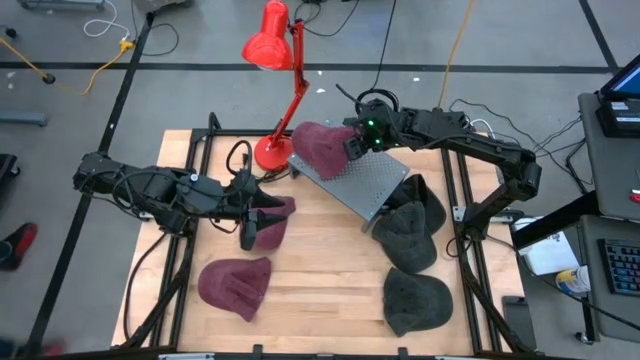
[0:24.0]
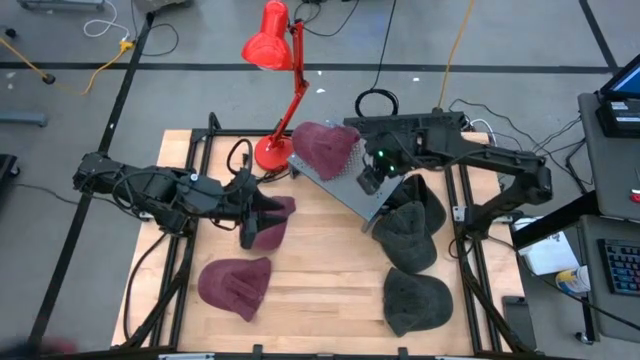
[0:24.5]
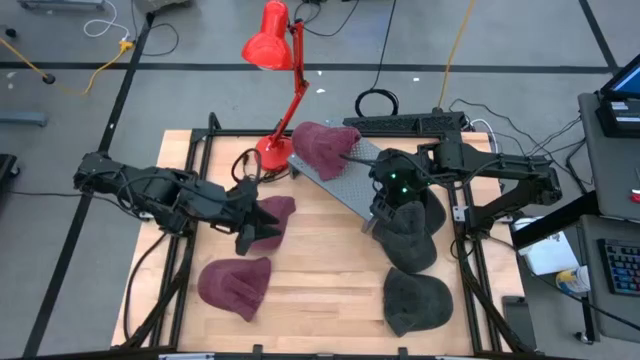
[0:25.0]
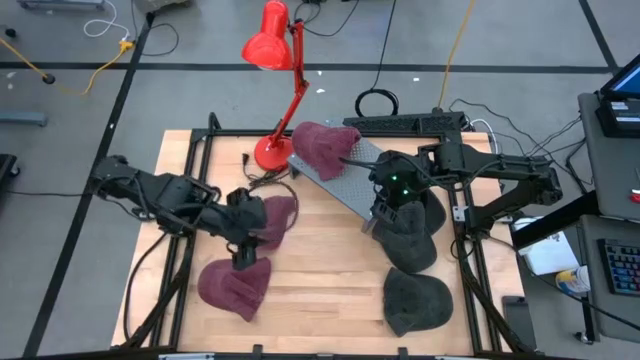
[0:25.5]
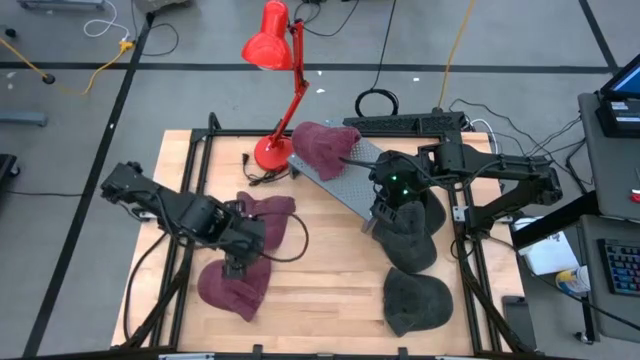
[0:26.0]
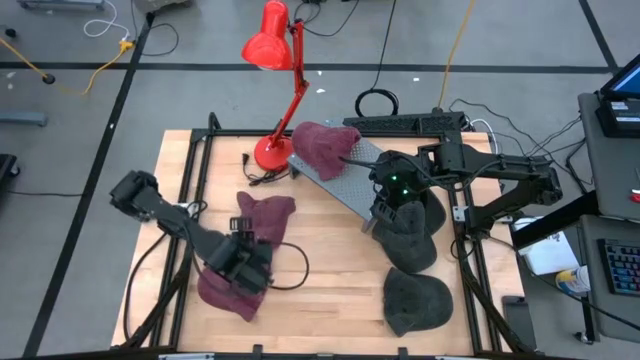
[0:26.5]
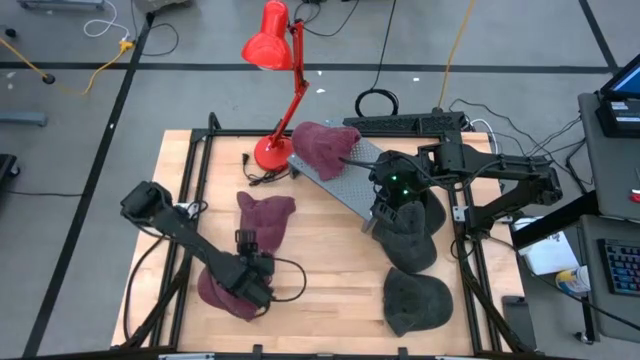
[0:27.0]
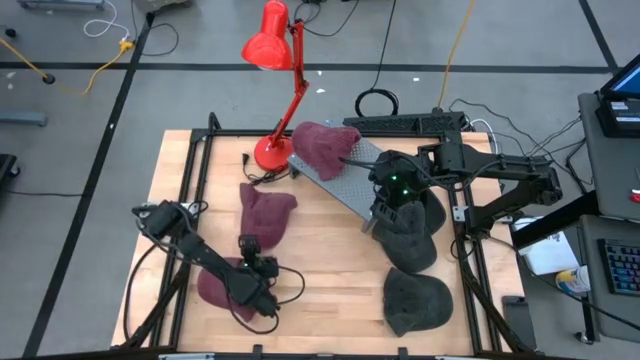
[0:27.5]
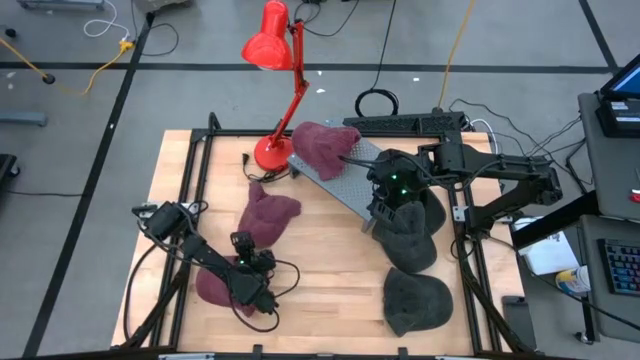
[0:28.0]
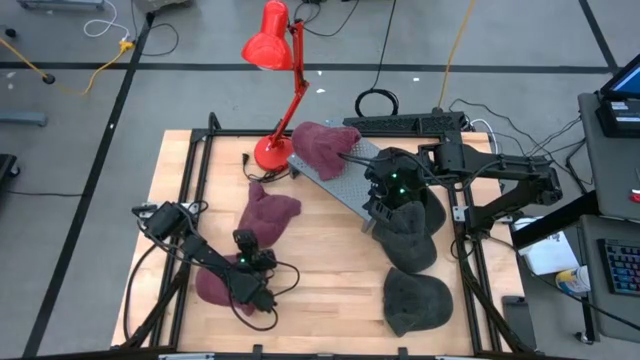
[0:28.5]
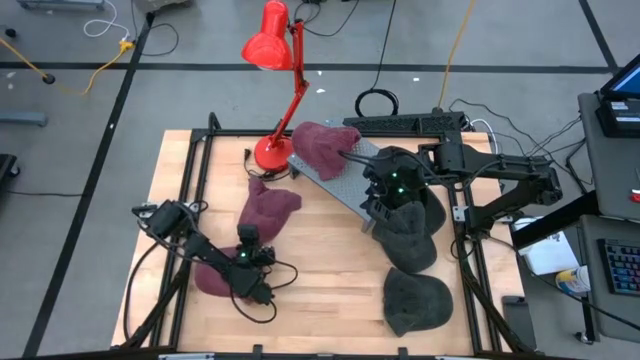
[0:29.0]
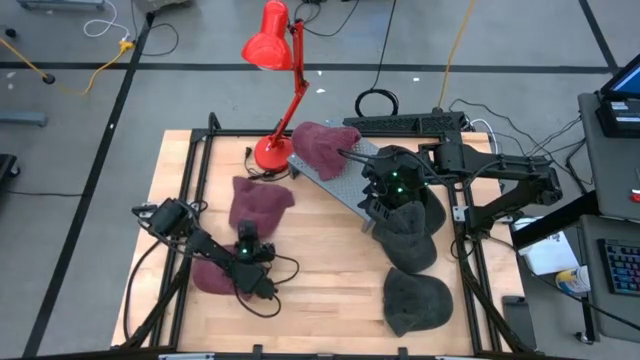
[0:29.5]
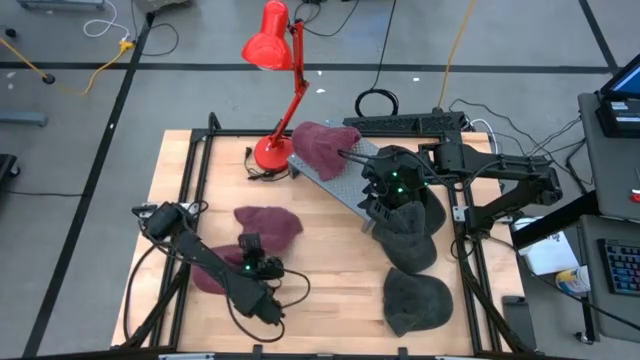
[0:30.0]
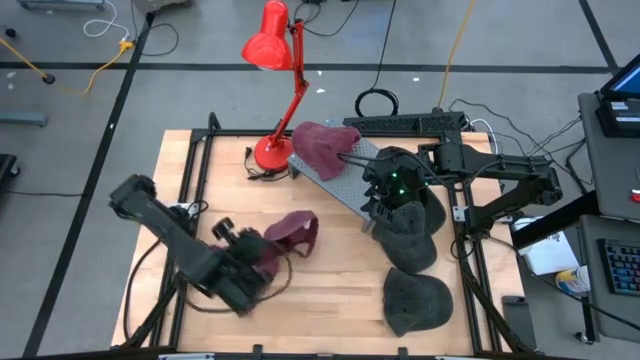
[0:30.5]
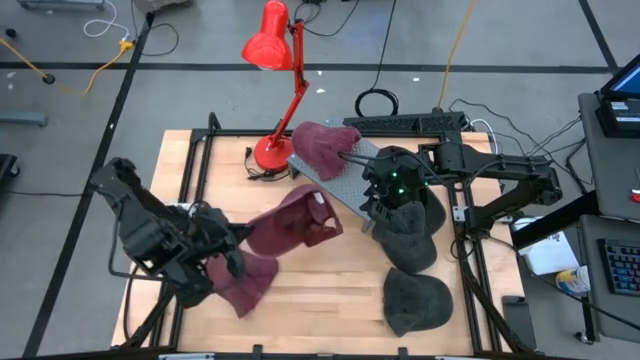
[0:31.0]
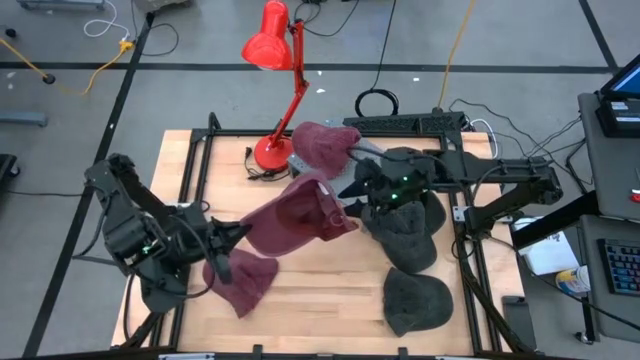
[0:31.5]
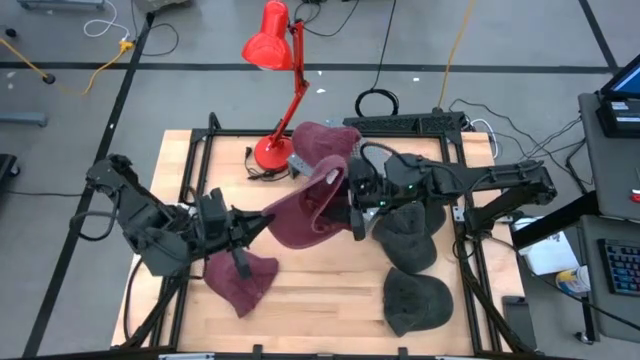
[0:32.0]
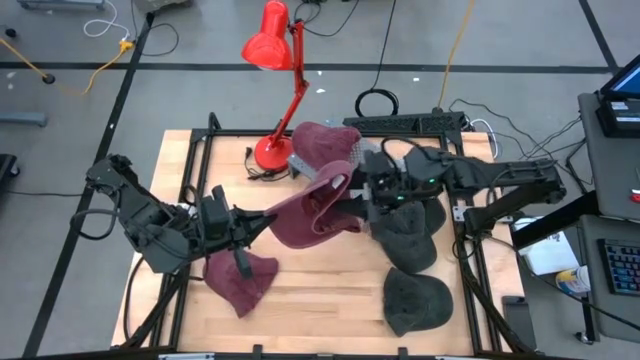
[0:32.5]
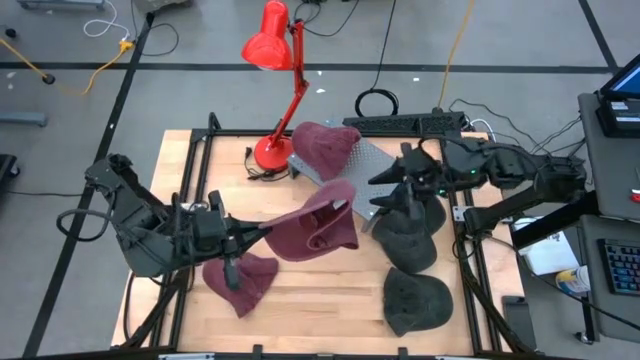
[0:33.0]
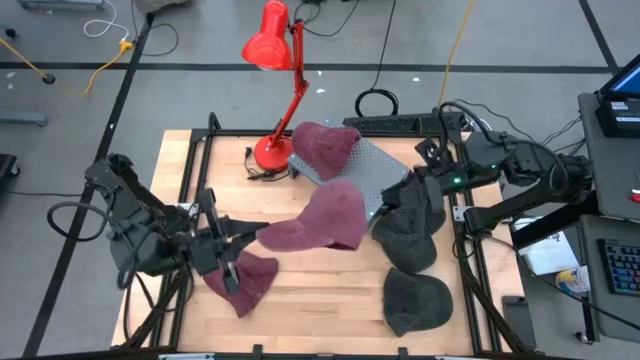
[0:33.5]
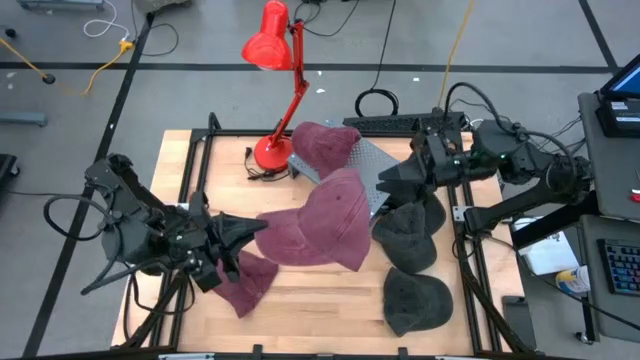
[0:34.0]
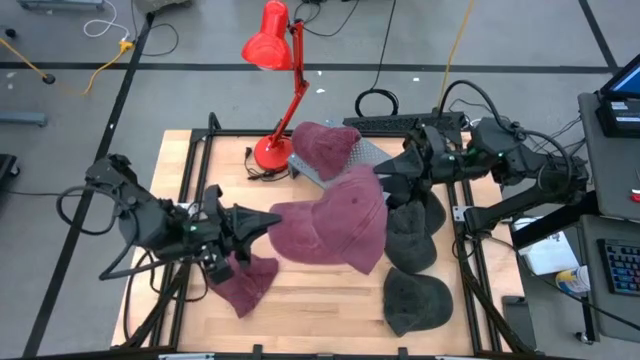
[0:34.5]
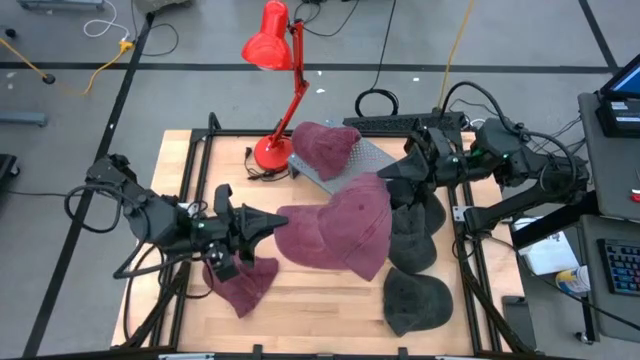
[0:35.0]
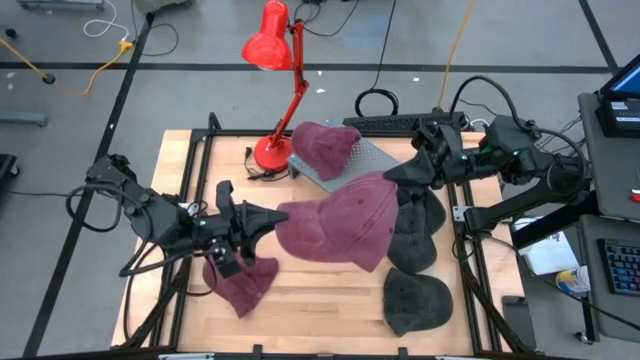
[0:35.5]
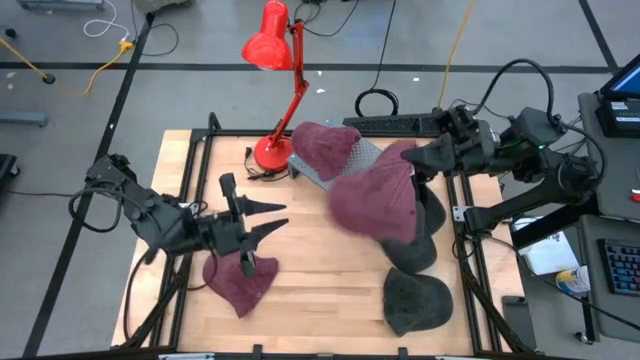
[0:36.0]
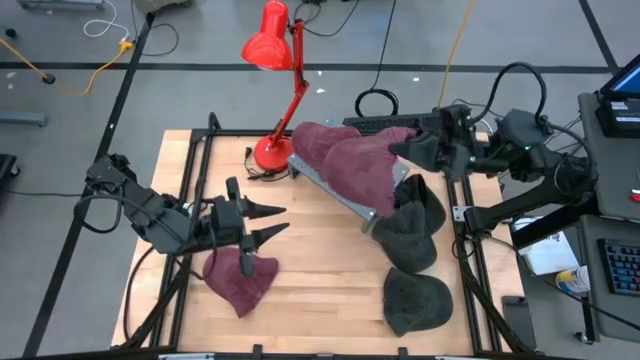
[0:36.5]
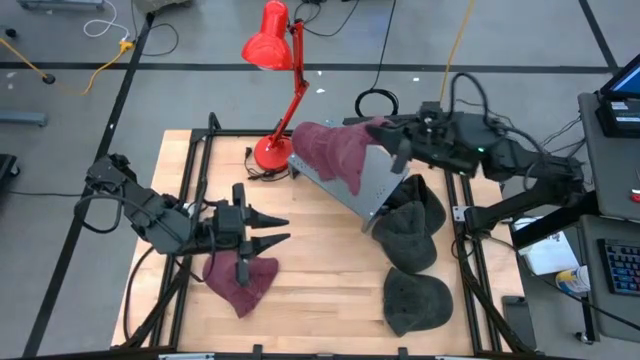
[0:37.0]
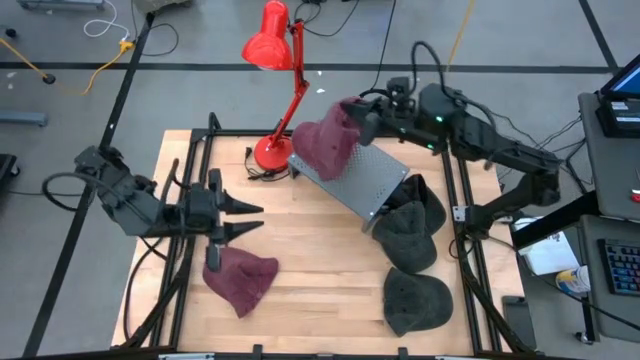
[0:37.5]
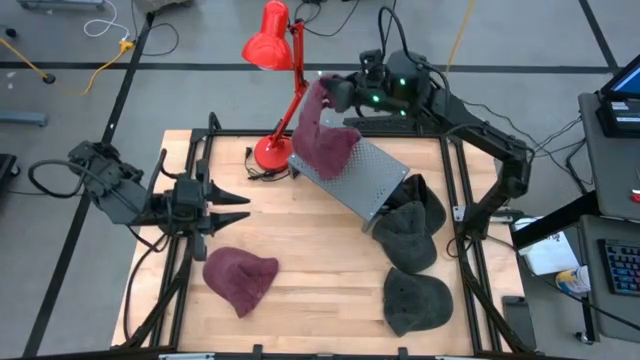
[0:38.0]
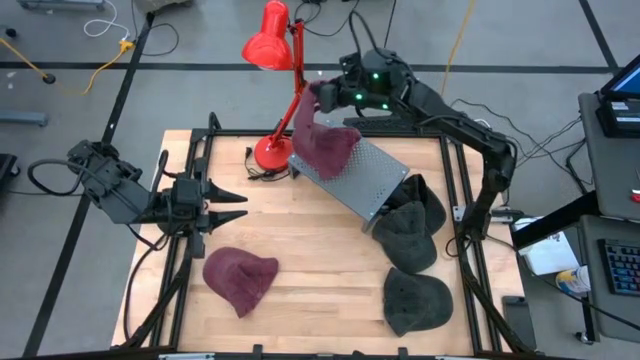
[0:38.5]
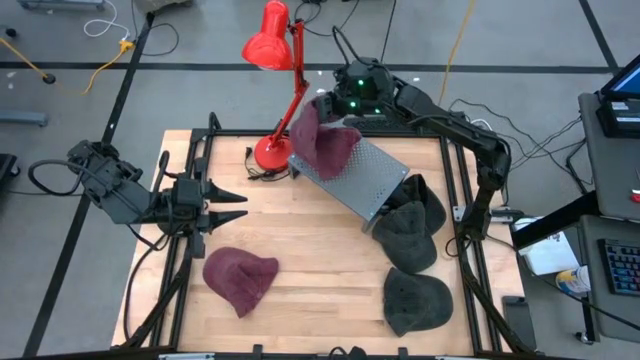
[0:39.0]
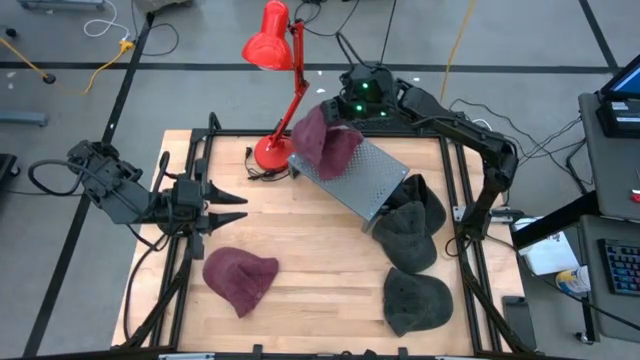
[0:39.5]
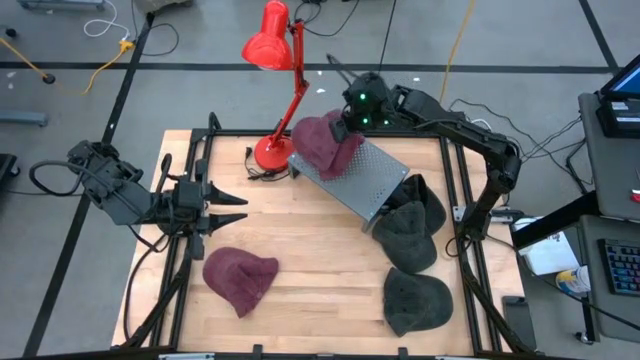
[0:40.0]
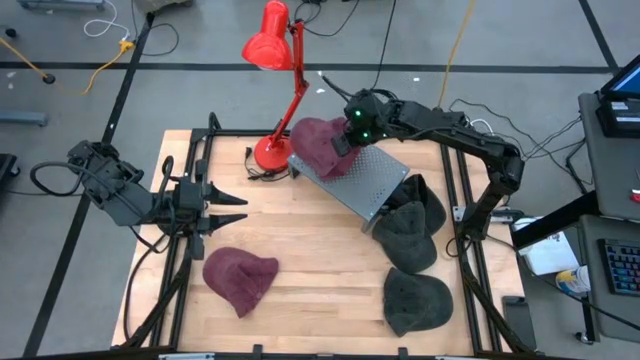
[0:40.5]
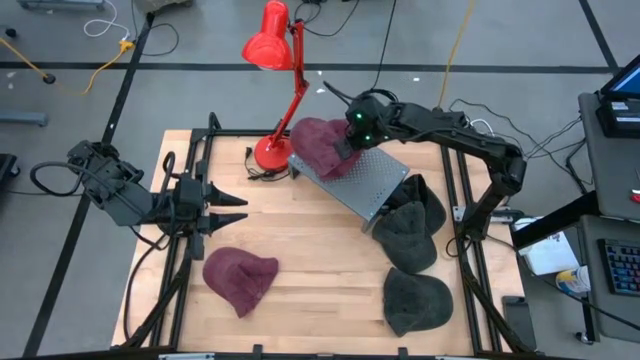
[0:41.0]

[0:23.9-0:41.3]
Task: Pick & Place hat
Stack the red cap on top of the red cap on the shelf

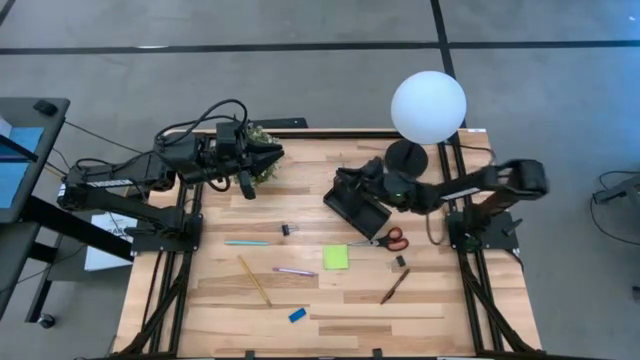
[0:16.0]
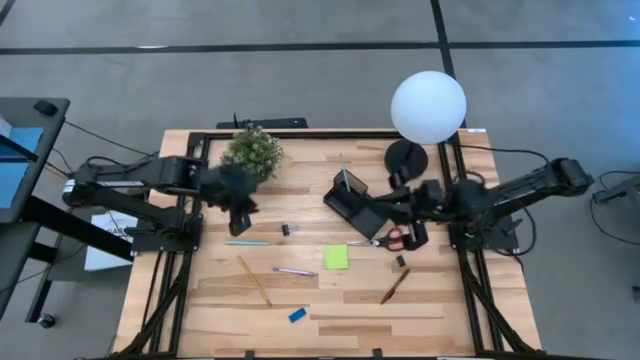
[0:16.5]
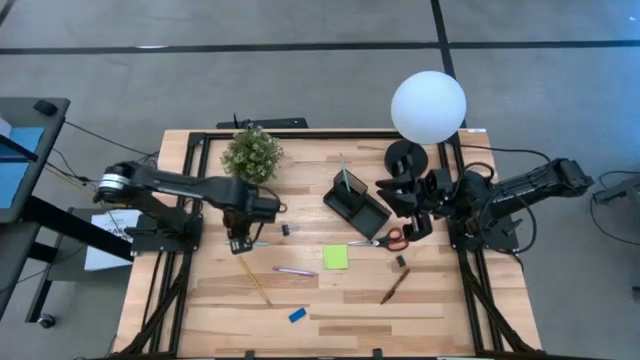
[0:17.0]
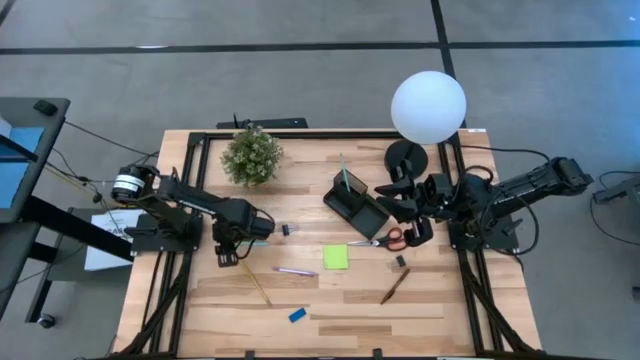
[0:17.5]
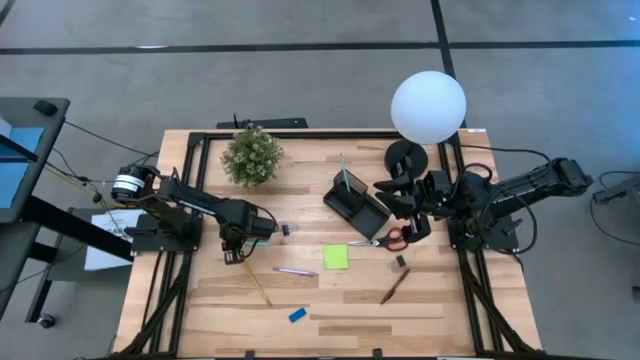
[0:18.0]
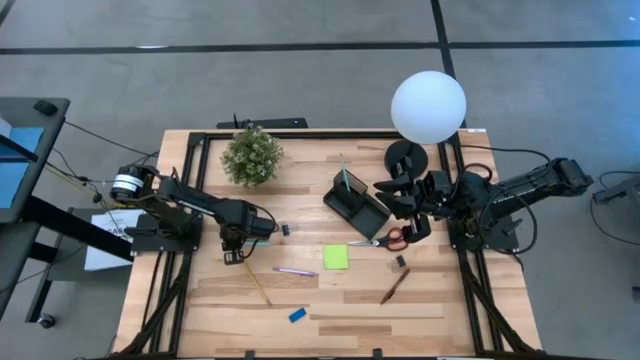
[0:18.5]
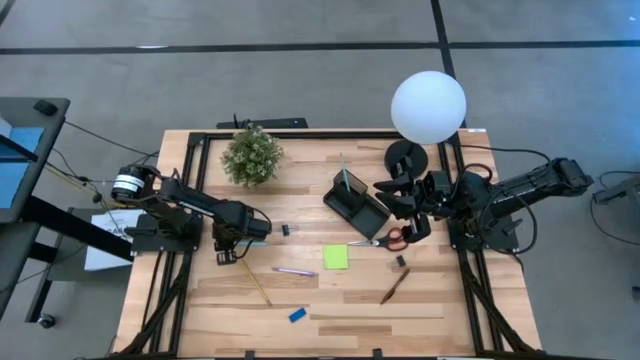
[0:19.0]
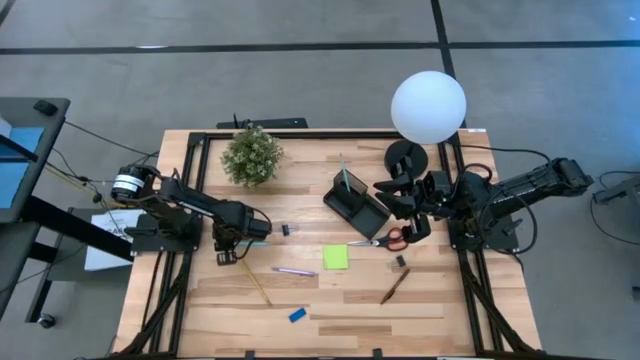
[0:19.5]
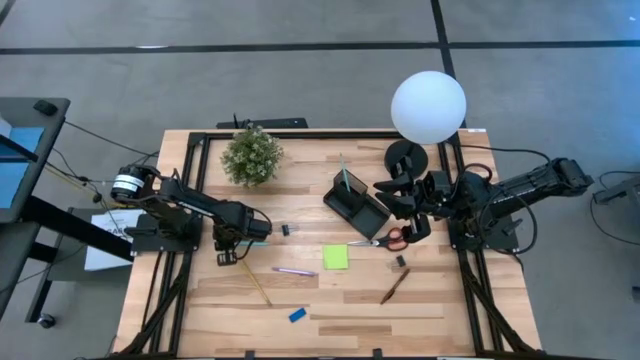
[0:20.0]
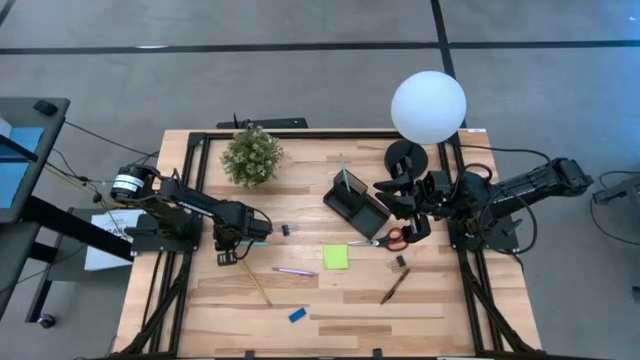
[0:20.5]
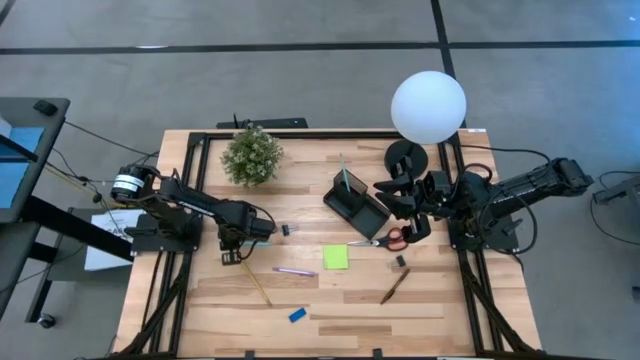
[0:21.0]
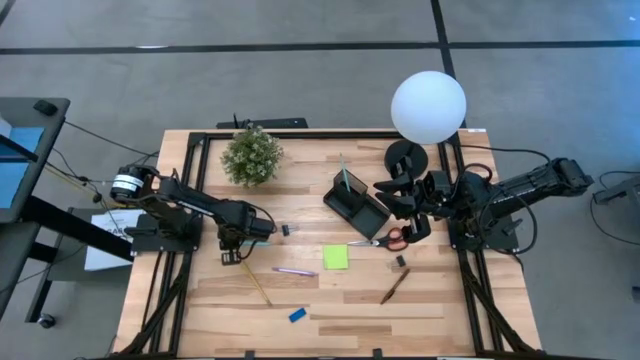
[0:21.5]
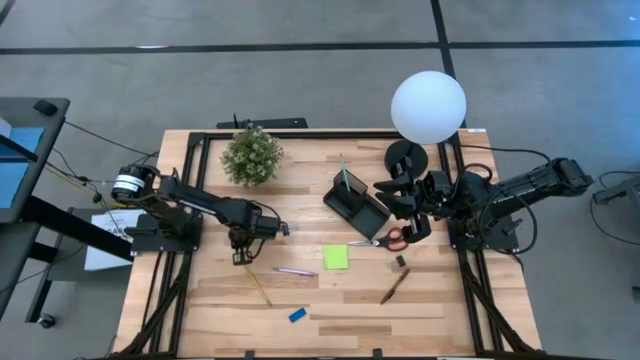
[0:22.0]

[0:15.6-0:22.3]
Task: Pick and place office supplies into organizer
Put the blue pen into the black desk organizer
